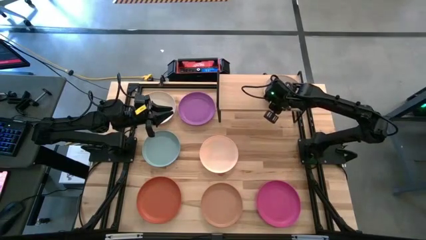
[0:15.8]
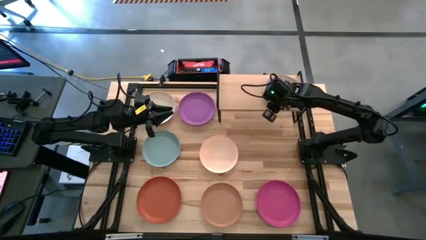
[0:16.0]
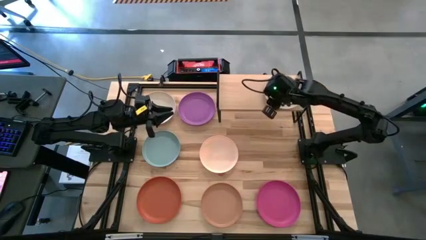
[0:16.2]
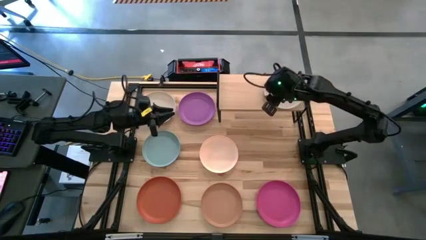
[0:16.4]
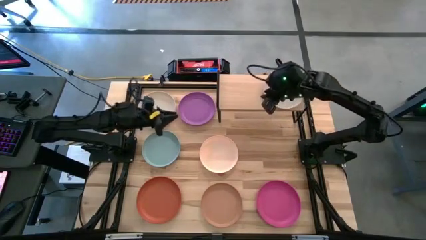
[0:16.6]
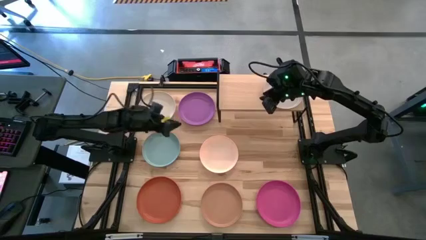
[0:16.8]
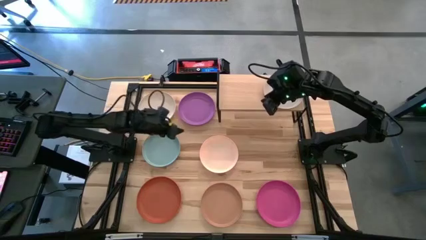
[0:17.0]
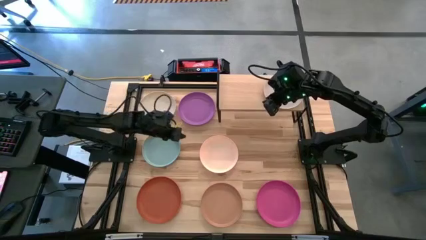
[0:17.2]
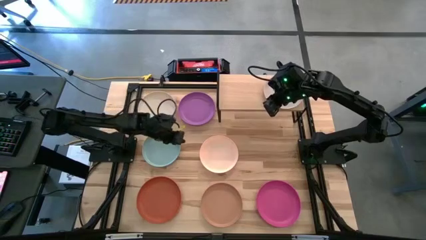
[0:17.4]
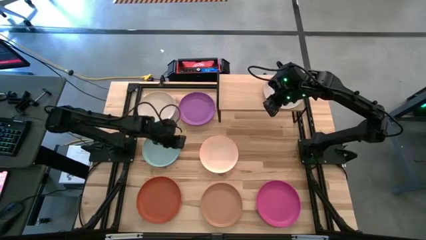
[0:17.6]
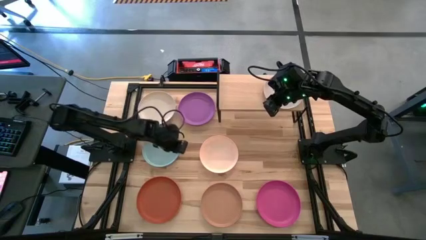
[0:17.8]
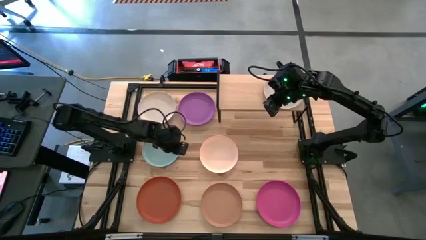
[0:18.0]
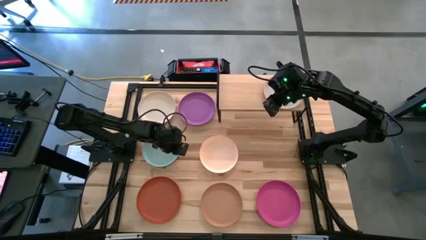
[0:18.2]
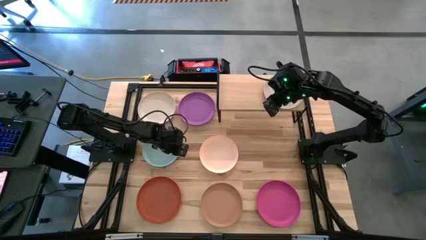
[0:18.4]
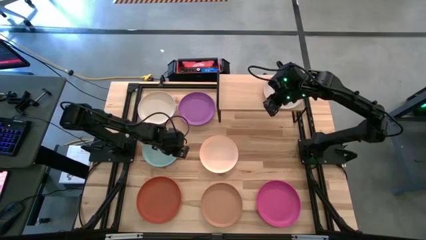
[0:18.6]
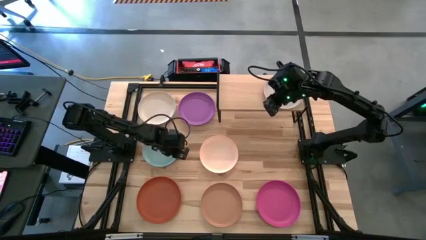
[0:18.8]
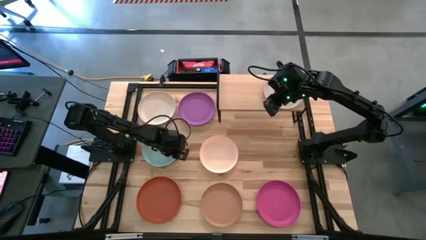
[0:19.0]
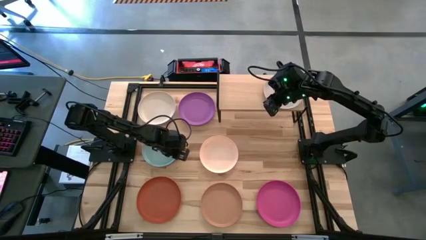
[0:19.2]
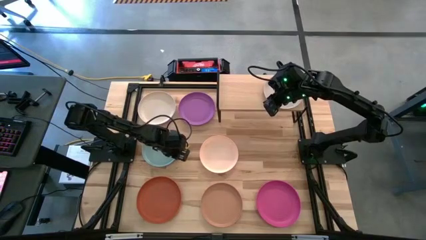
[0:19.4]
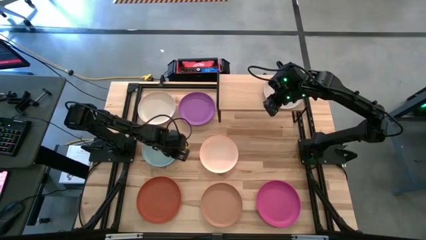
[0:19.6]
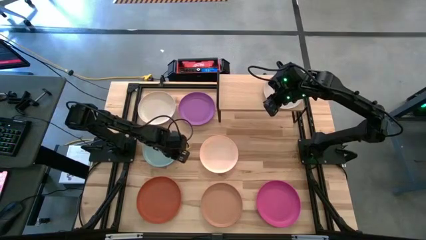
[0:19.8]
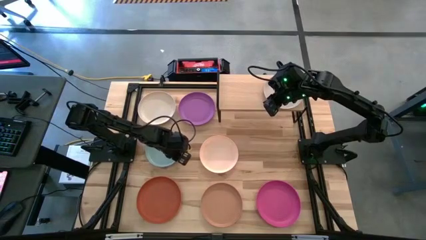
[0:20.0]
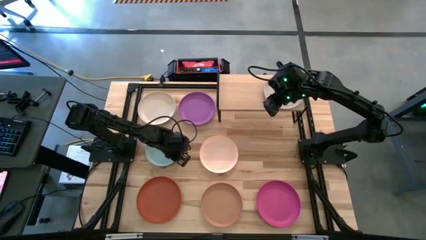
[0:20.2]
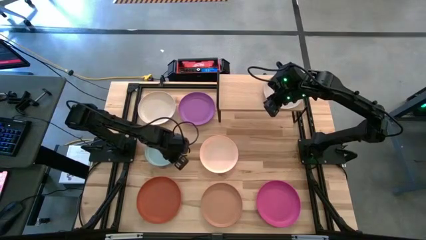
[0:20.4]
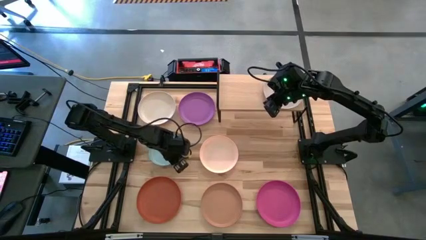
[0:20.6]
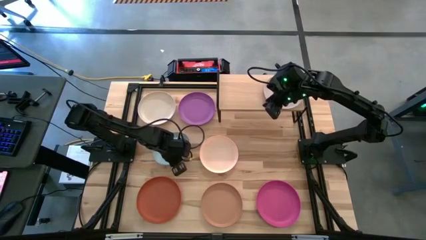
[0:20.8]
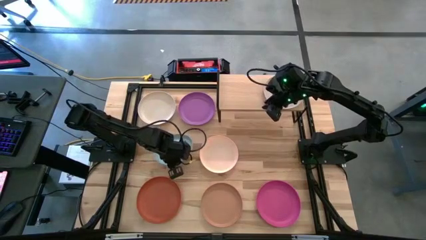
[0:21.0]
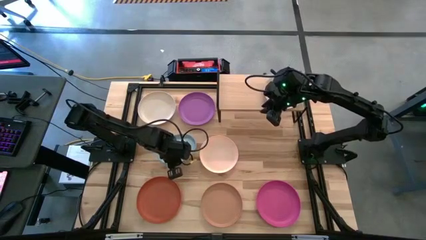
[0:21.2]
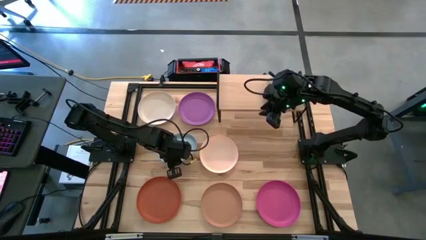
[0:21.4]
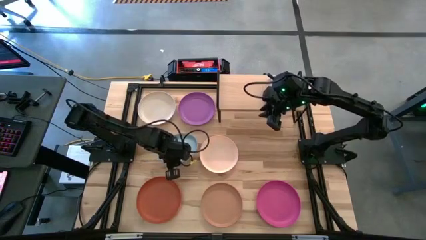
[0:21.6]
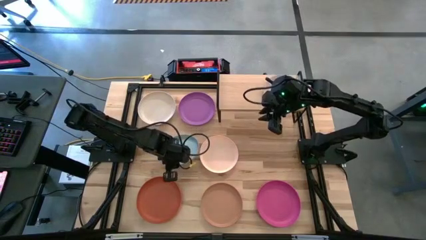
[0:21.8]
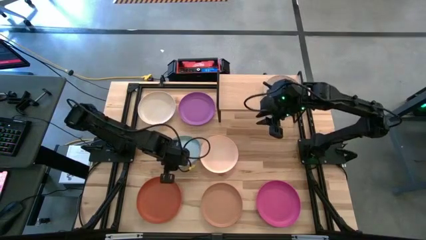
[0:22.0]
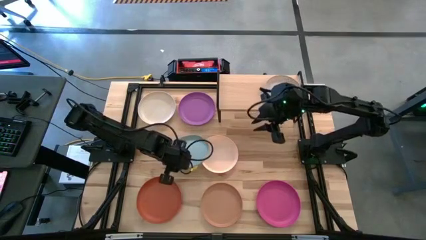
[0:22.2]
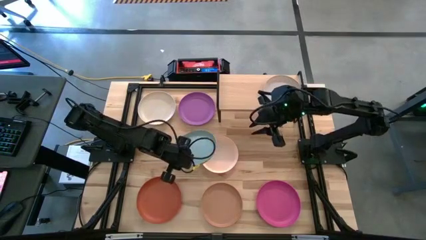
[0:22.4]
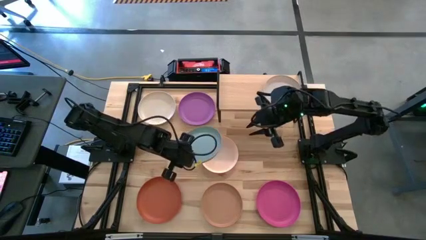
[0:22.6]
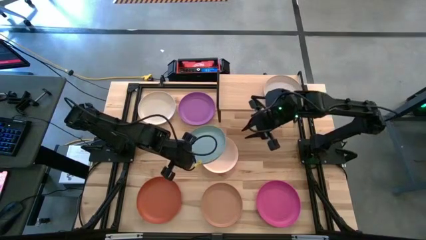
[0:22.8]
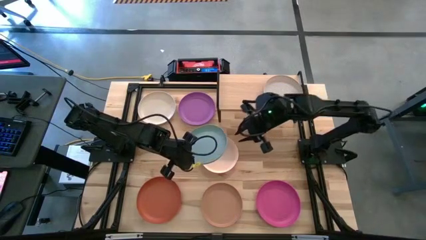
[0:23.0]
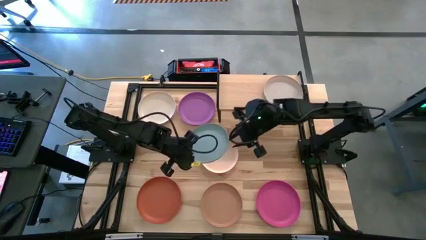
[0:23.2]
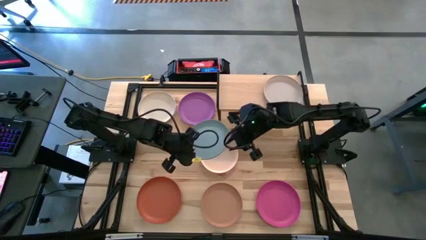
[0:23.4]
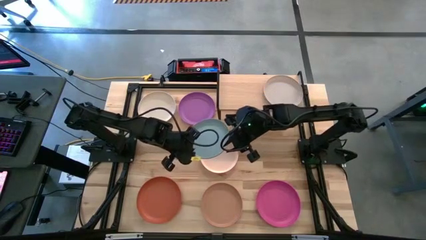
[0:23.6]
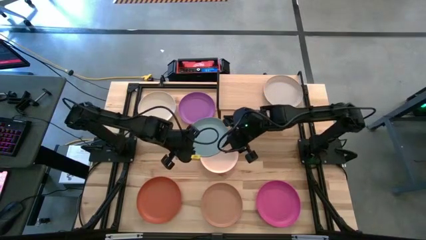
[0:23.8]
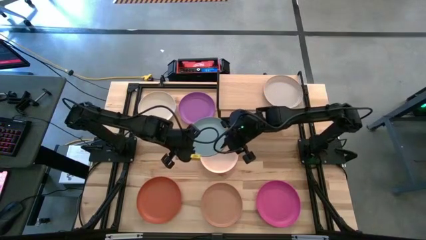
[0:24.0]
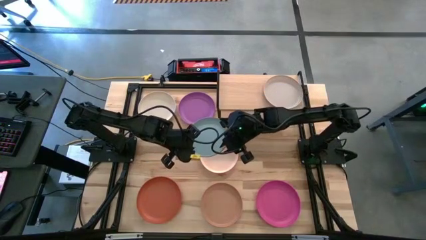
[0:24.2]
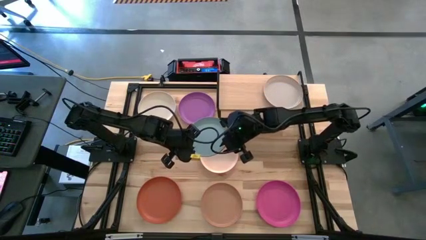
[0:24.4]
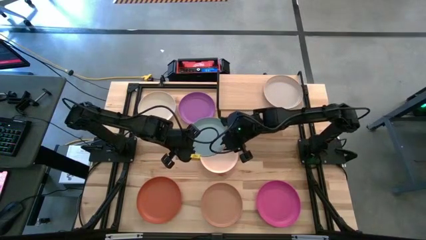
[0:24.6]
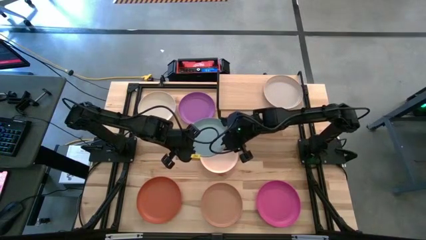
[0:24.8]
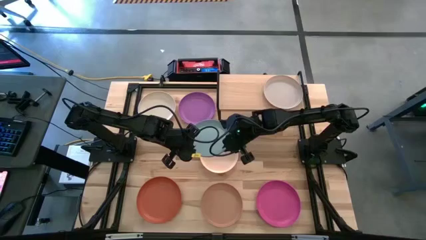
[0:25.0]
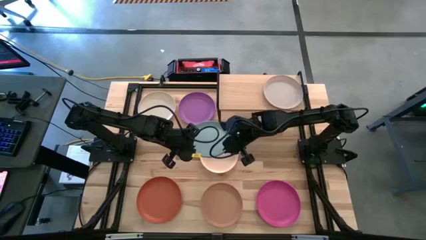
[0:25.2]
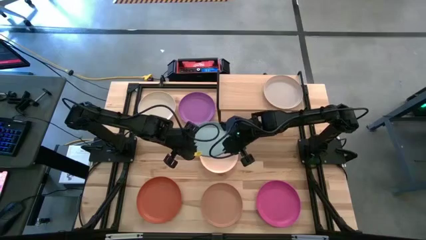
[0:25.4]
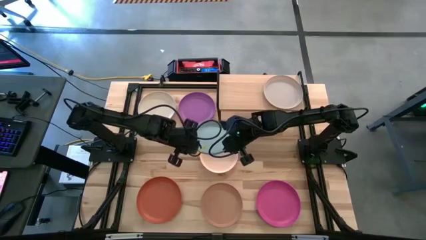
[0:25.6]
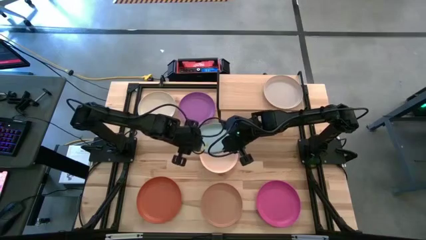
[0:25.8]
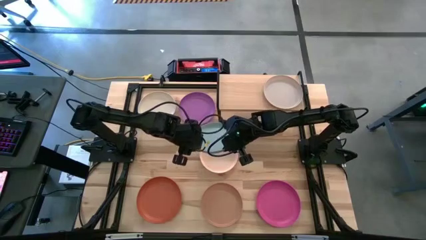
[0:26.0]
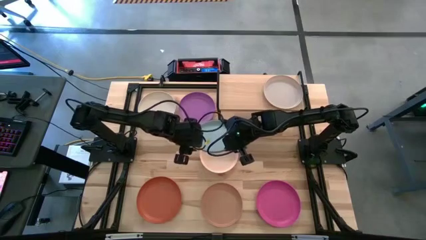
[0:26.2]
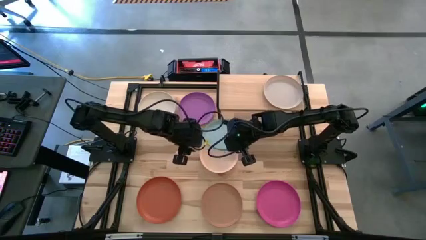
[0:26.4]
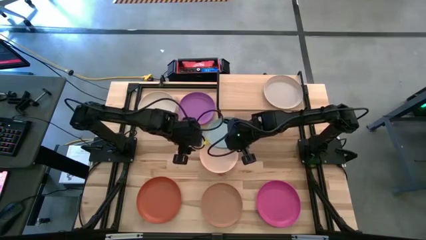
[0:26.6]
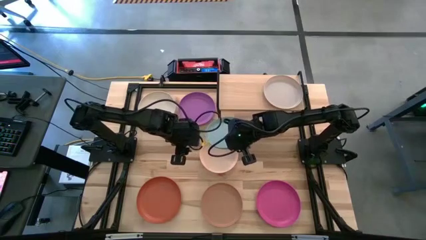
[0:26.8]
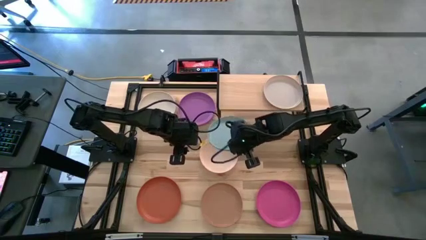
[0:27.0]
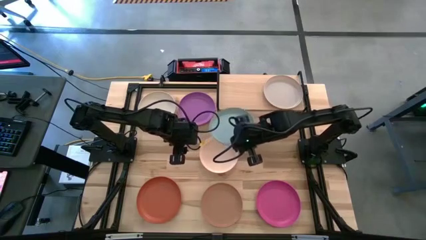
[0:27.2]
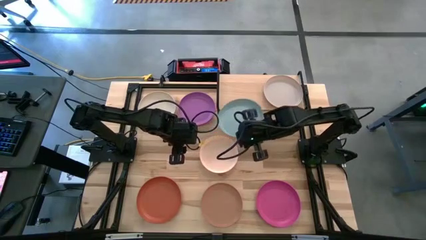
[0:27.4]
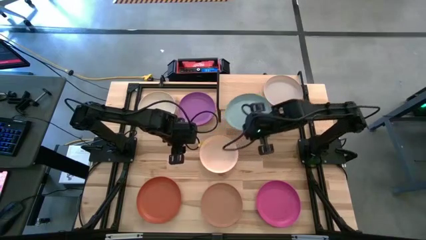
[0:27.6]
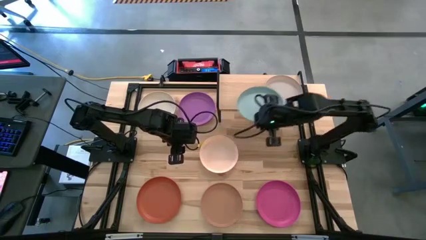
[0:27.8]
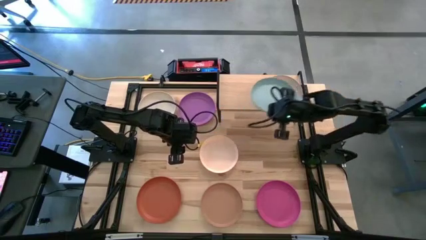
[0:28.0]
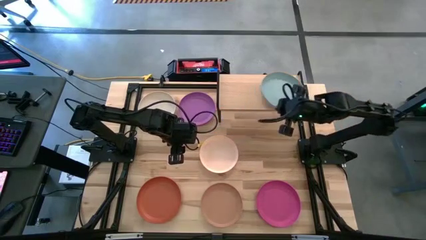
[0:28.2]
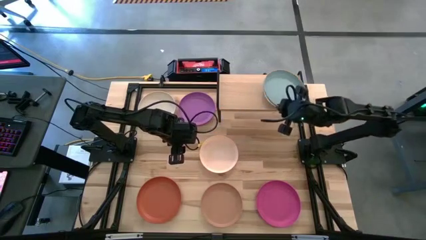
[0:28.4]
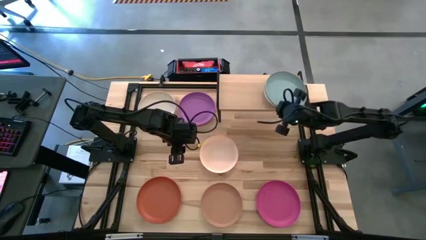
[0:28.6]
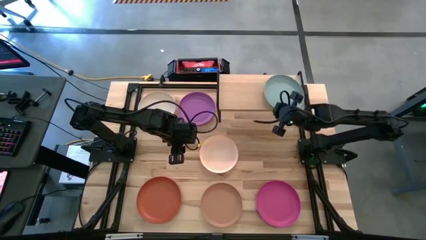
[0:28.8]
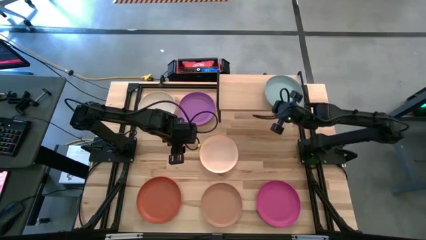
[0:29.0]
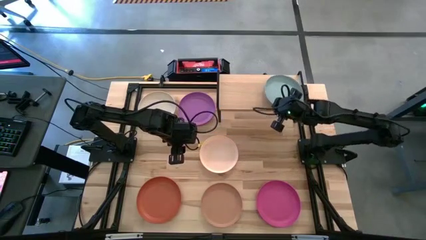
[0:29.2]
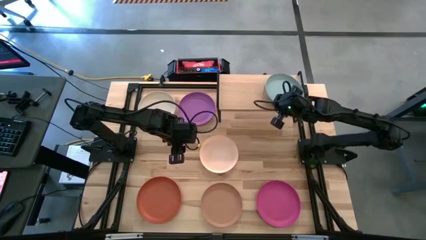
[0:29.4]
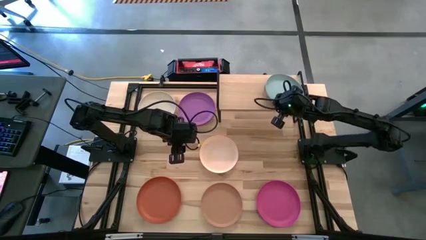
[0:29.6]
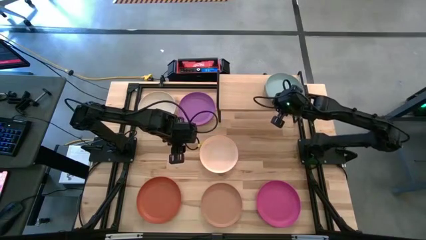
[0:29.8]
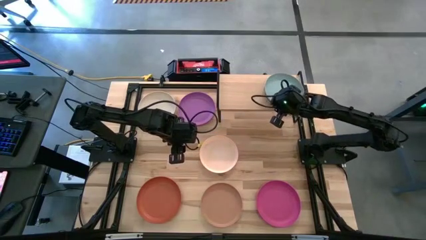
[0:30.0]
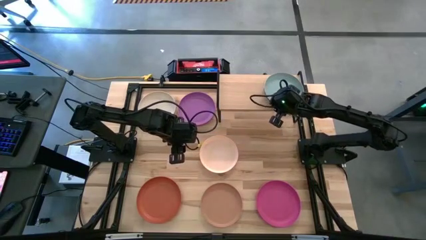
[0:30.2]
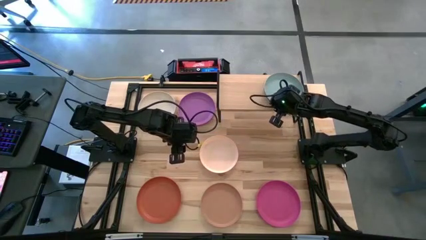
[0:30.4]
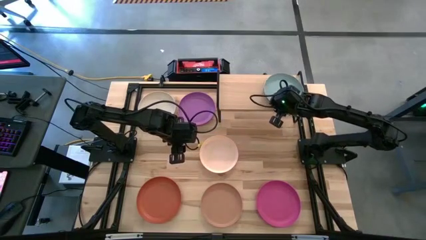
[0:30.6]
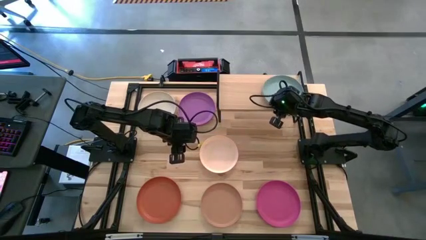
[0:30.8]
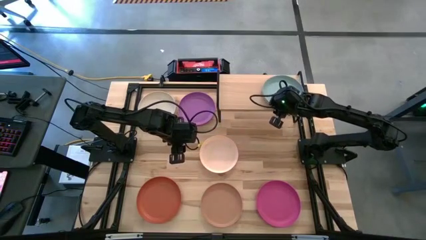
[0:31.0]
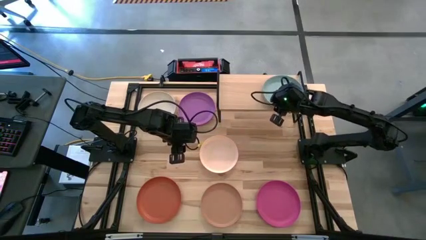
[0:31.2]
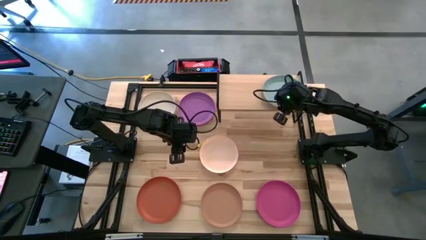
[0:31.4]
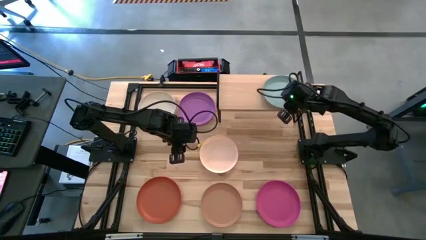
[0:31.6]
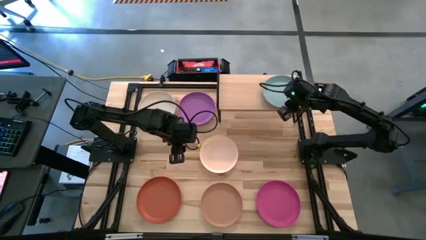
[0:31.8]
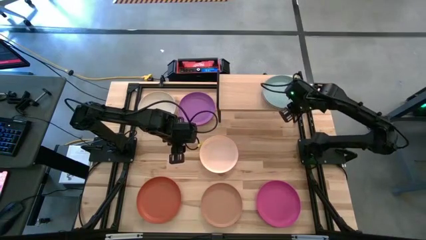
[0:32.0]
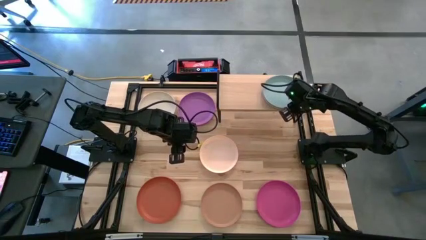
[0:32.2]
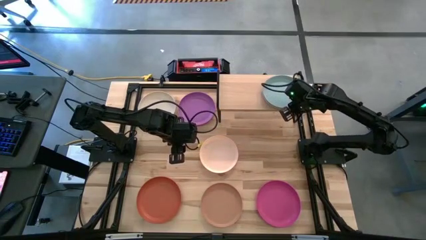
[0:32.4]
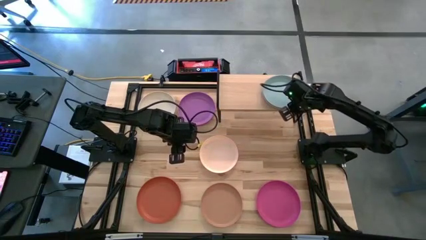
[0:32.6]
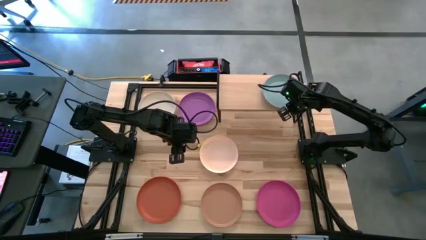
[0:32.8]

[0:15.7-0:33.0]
Task: Place and stack plates onto a shelf
Stack the blue plate on top of the gray plate on the shelf
